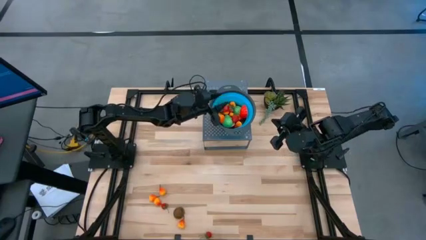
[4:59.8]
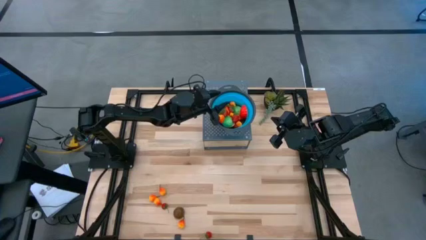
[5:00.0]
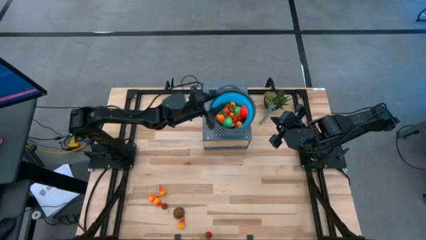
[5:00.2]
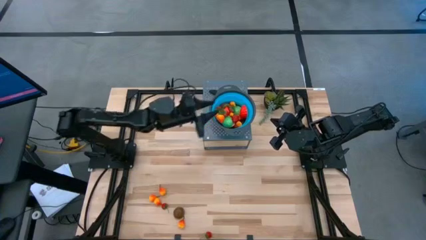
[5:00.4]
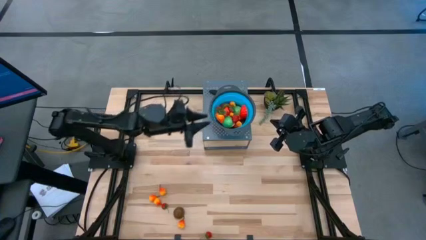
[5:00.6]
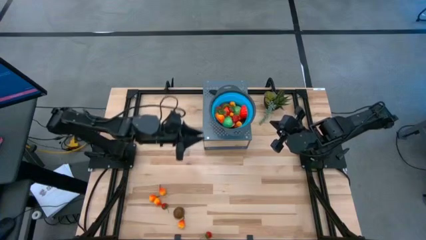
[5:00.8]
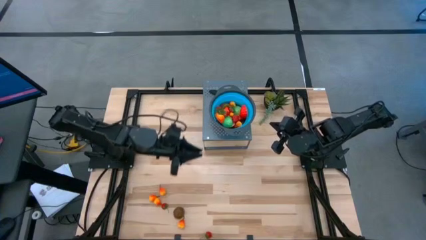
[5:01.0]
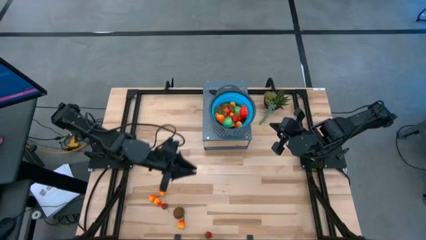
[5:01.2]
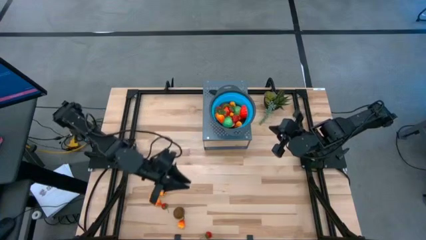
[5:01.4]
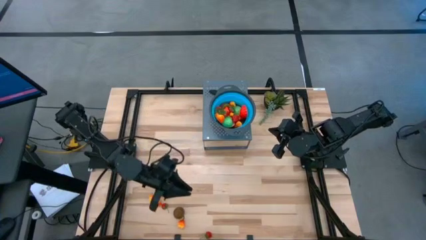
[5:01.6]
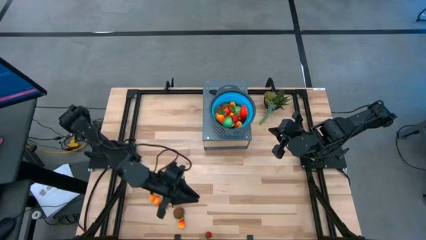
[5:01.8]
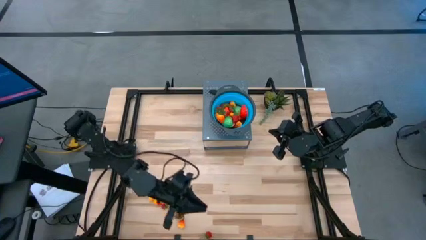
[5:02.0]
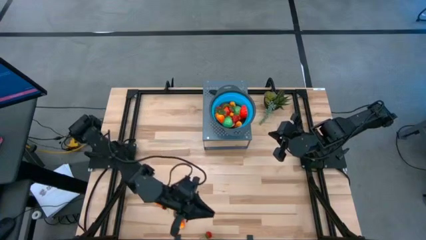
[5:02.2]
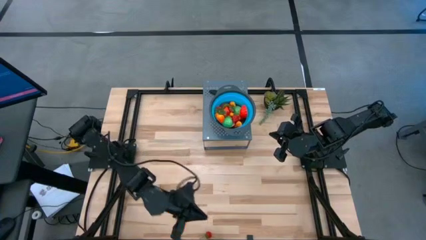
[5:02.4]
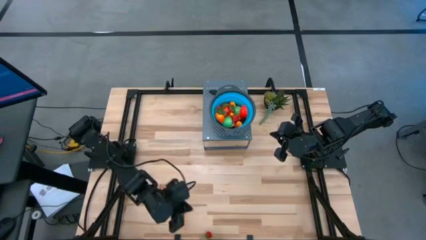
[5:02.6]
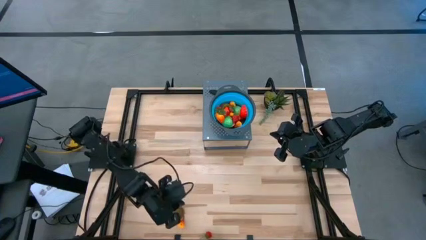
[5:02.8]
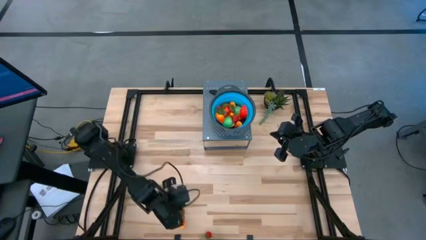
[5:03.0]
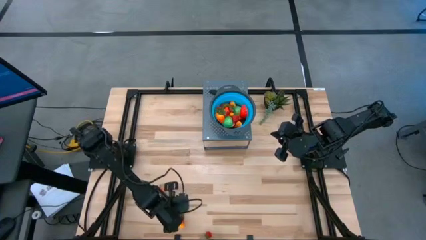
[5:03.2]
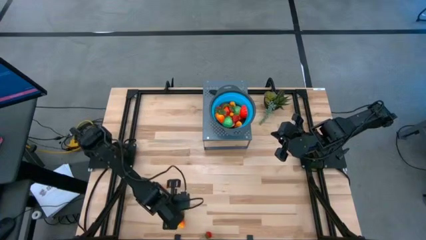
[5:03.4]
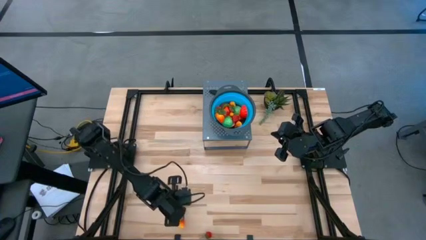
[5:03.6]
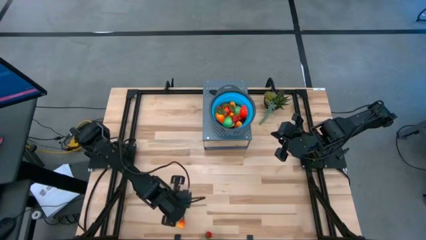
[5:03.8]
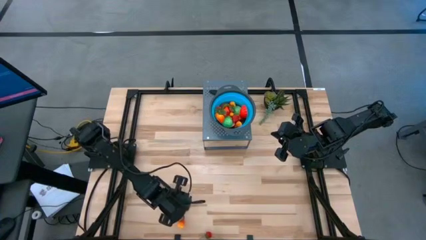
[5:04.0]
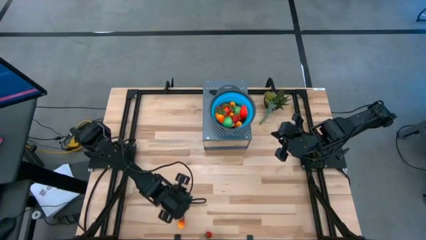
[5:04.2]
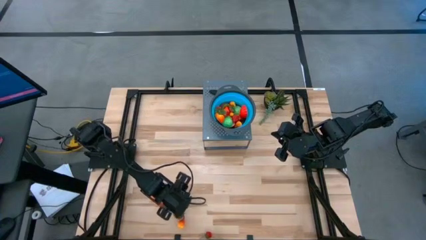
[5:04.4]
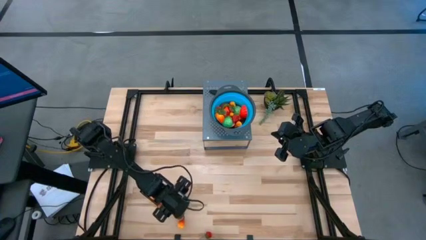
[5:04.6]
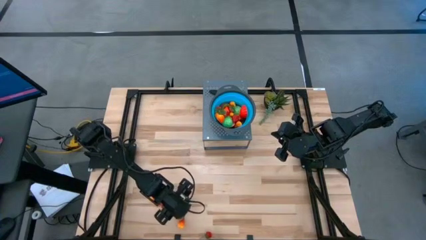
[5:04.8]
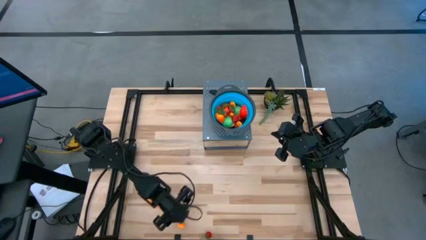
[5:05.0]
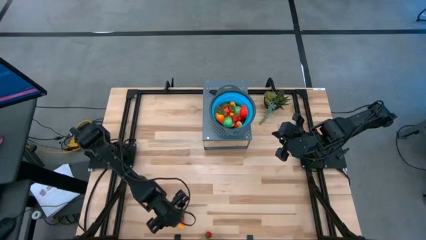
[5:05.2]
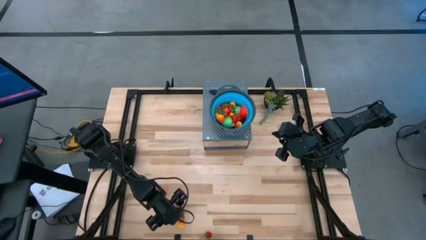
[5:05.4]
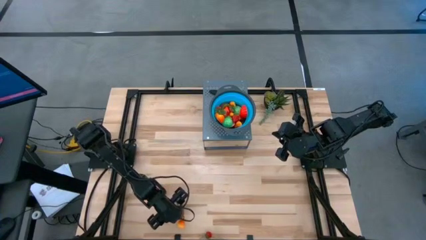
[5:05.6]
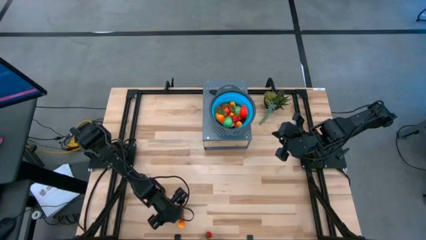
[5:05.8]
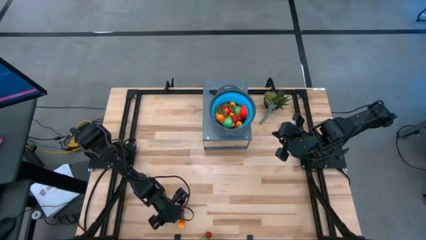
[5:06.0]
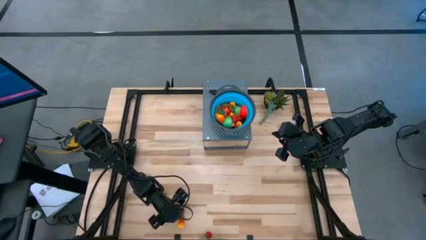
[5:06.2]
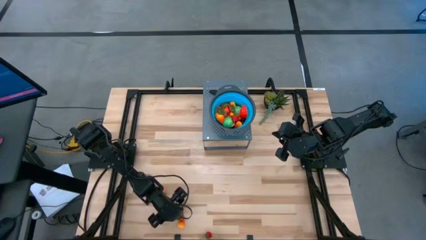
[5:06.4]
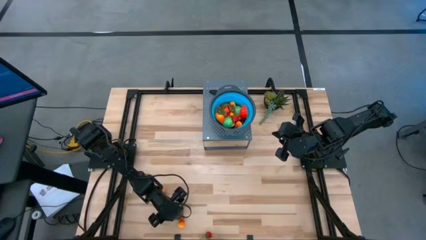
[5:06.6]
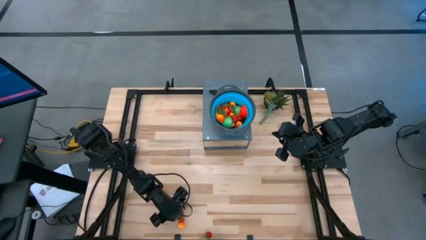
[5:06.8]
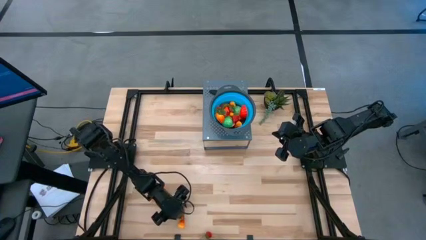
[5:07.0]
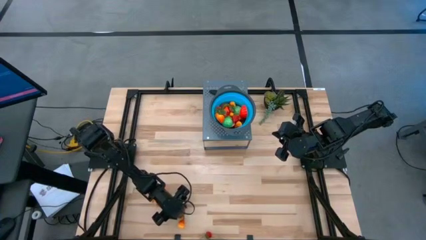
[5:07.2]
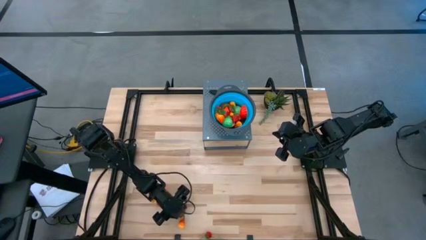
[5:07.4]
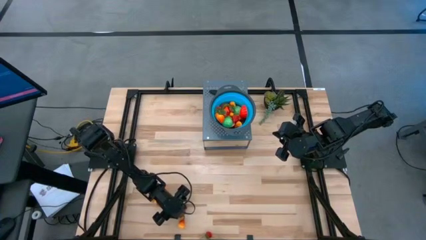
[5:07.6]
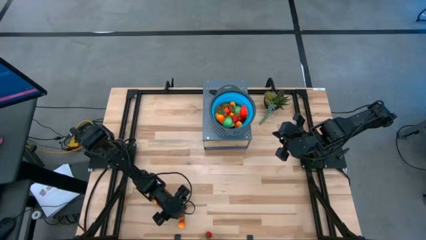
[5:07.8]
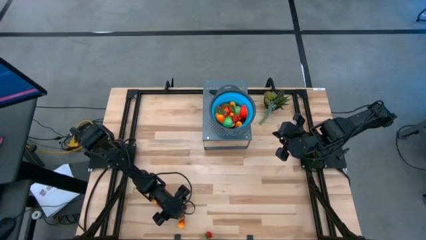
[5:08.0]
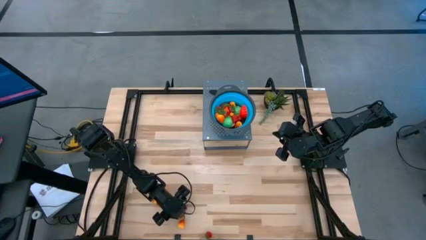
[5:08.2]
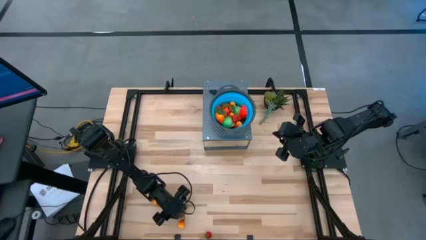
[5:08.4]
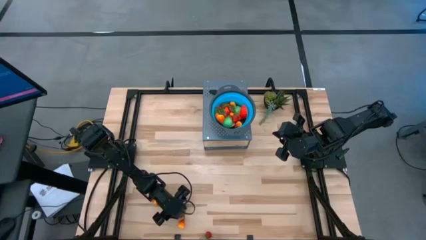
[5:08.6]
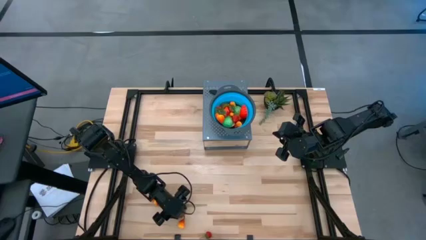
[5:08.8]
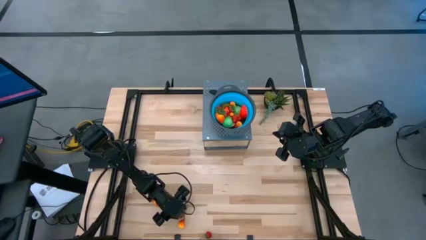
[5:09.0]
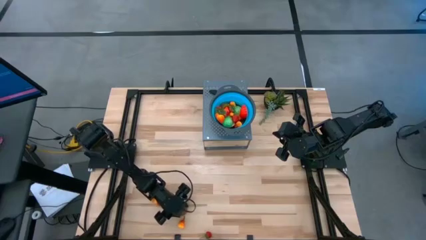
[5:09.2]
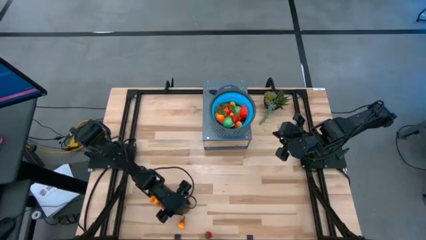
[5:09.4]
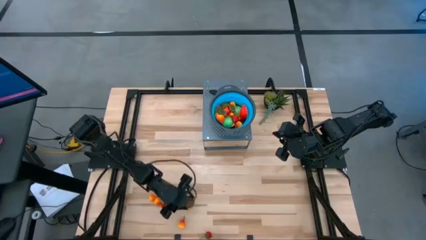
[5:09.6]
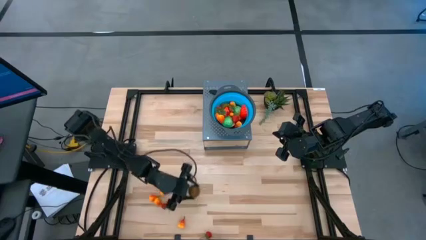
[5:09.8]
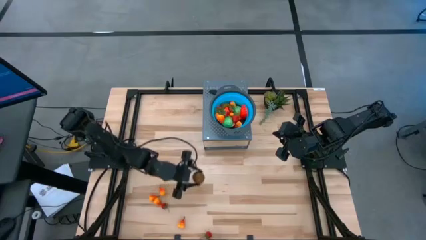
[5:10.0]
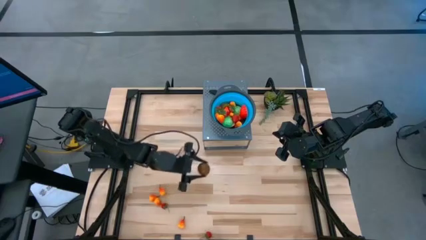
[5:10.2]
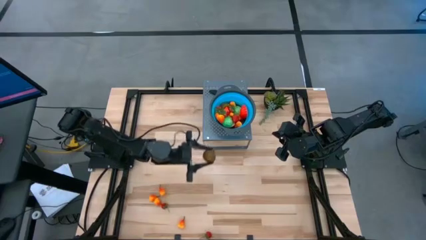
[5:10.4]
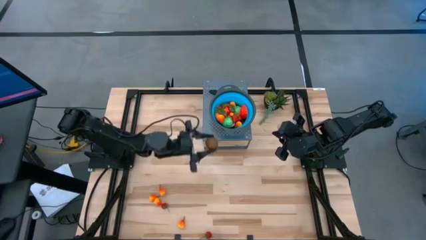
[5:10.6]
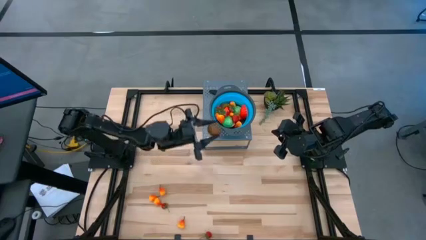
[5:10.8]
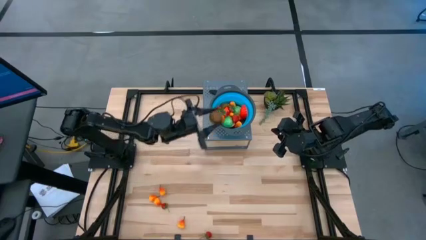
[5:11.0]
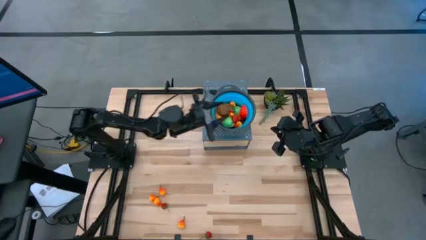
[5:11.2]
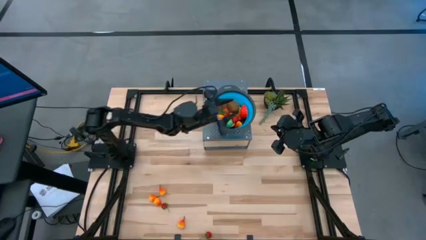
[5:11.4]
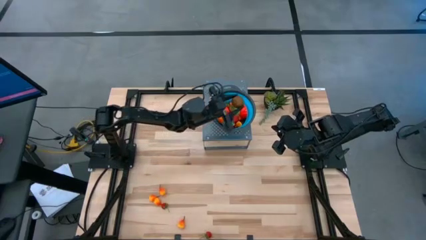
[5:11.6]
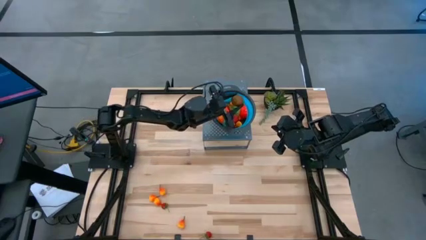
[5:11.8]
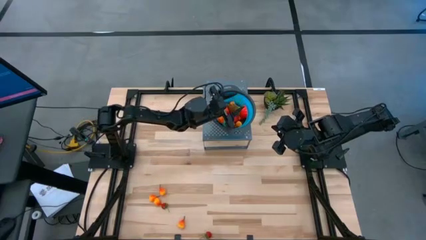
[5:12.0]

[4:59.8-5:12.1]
Task: Pick & Place Fruit
Put the sliced kiwi into the strainer bowl
